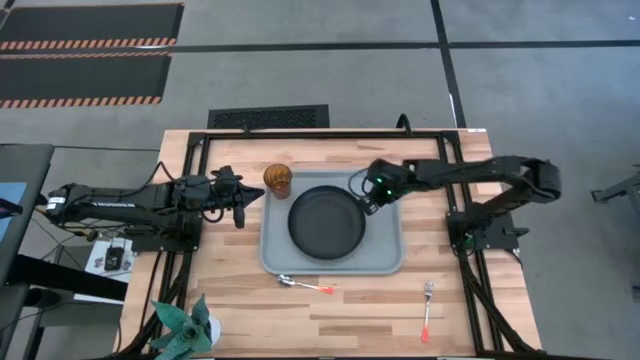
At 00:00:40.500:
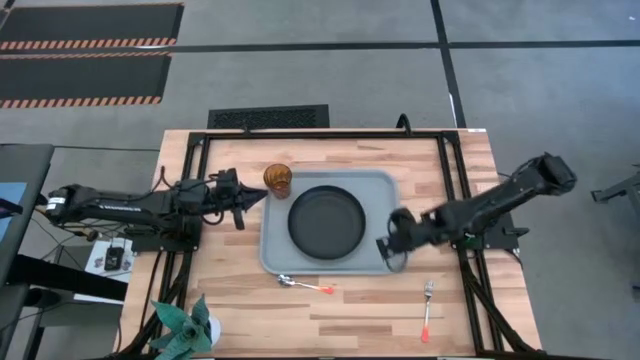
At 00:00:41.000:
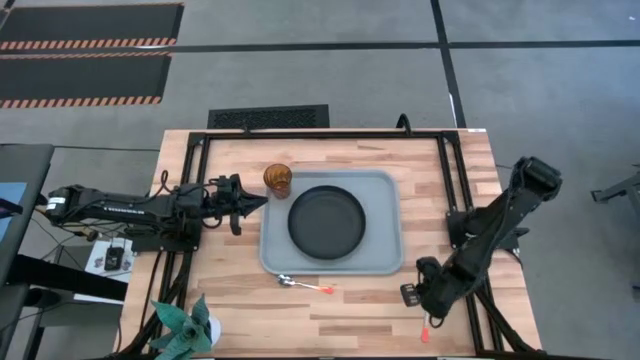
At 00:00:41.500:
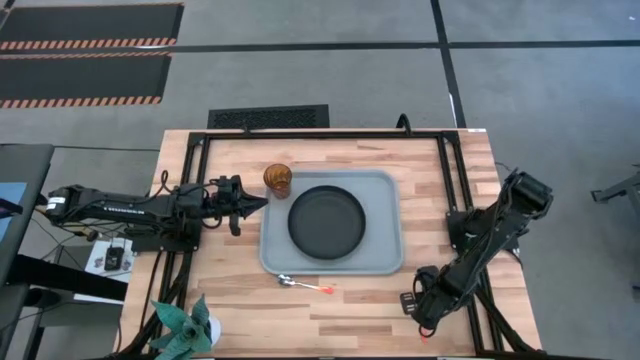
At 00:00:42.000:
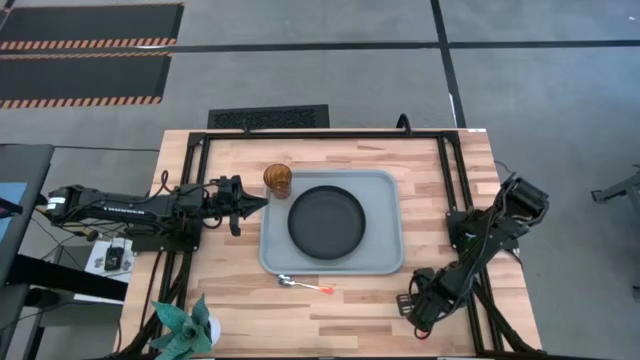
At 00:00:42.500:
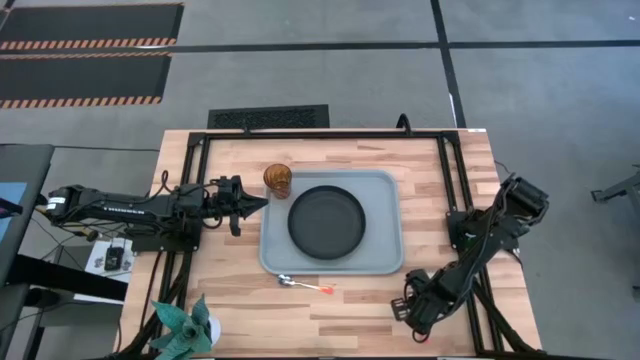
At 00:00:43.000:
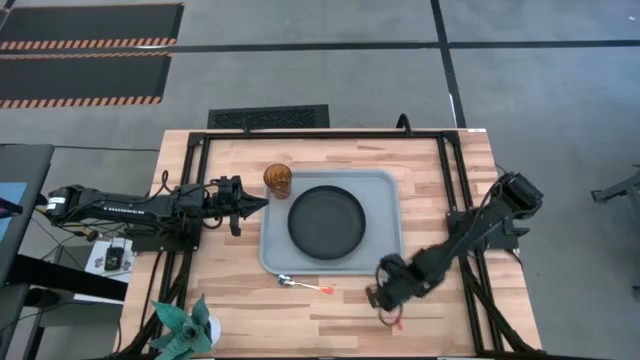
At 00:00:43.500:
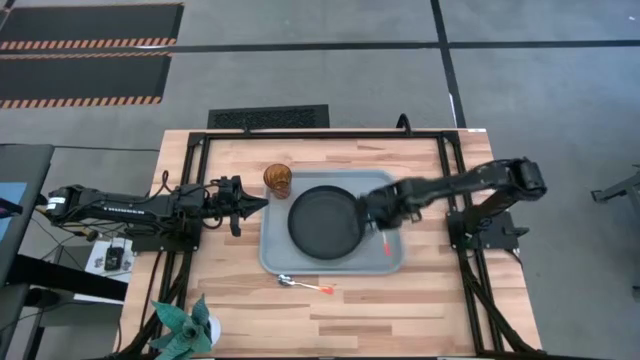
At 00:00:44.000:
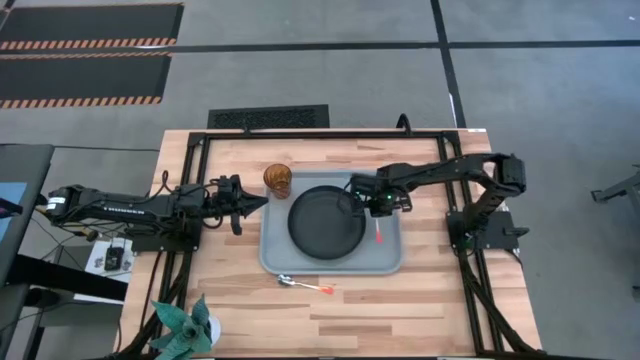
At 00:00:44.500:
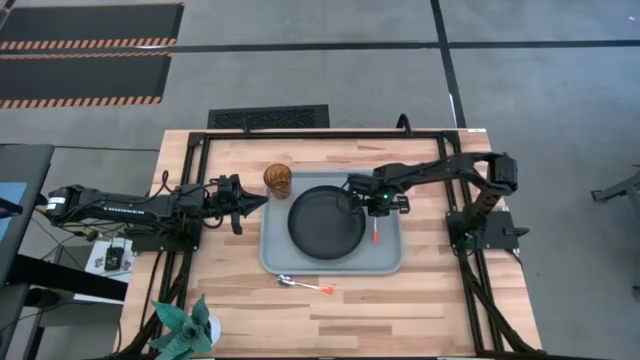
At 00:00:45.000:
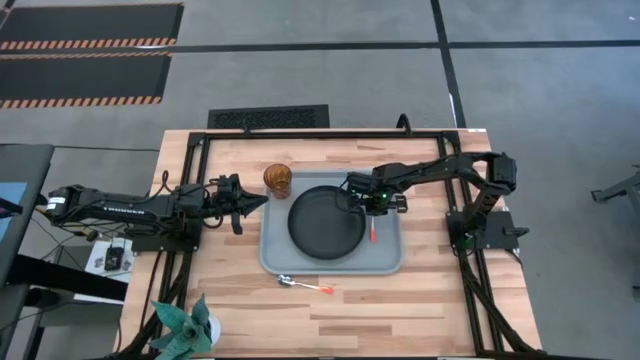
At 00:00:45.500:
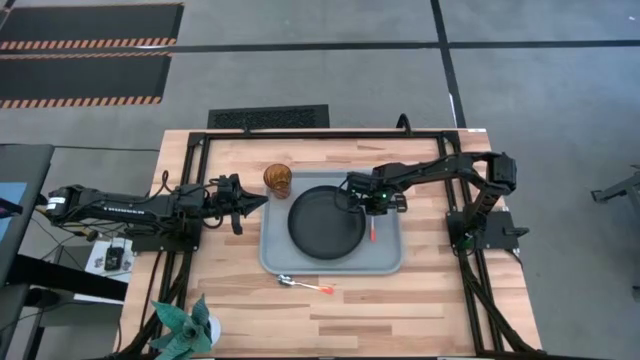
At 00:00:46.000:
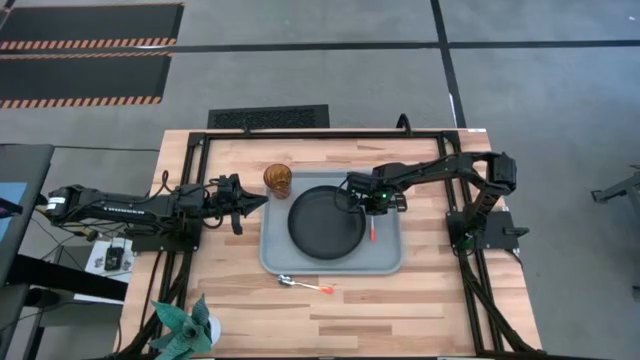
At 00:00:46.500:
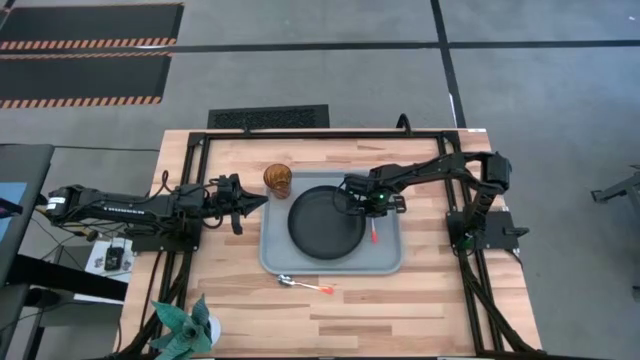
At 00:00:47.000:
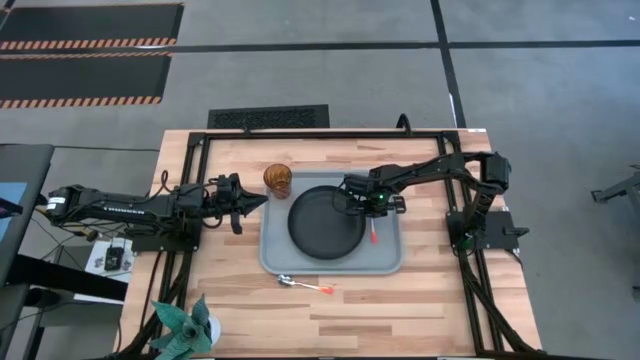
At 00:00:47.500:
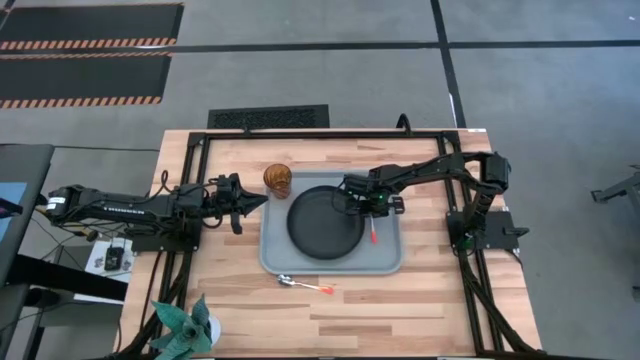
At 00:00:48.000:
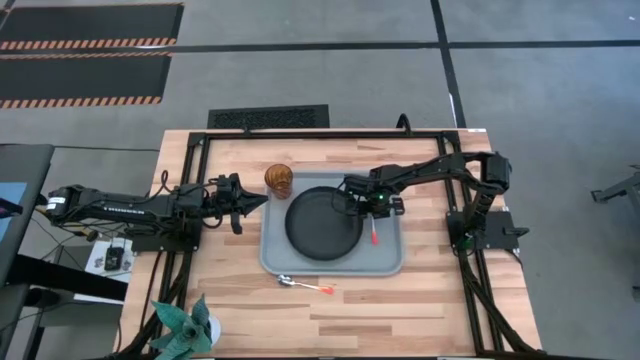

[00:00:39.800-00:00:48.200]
Task: Pick and place plate/cup/fork/spoon on tray
Put the orange fork on the gray tray to the right side of the black plate

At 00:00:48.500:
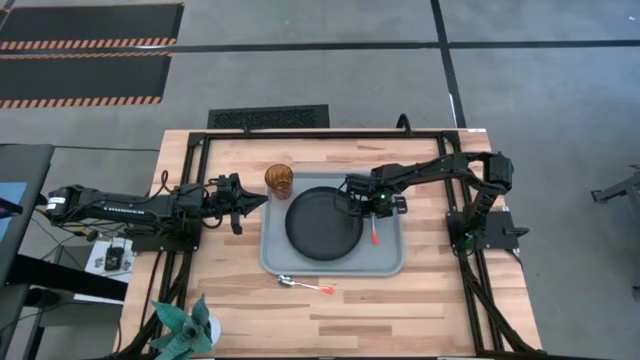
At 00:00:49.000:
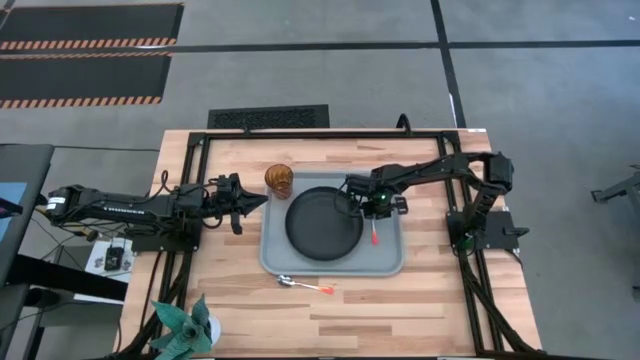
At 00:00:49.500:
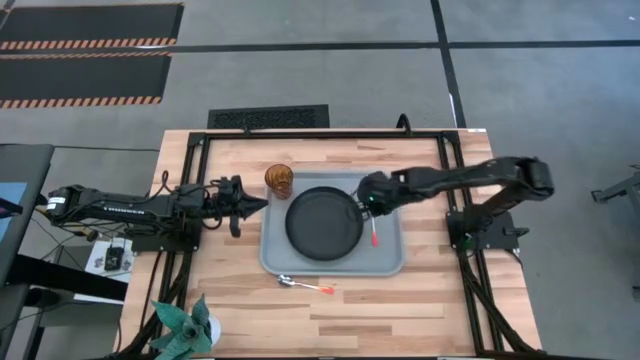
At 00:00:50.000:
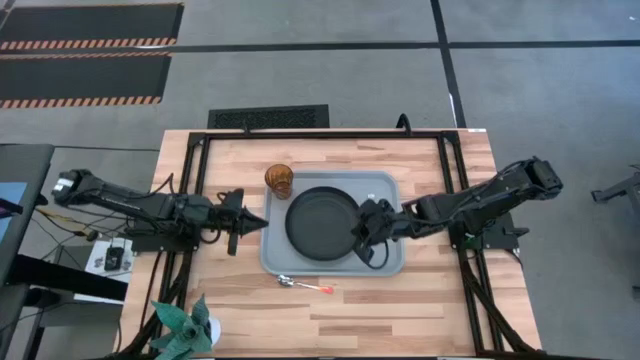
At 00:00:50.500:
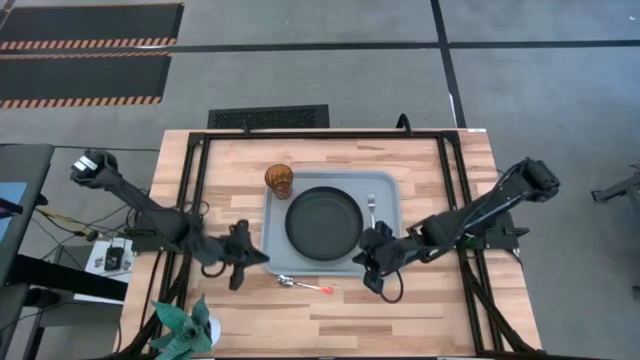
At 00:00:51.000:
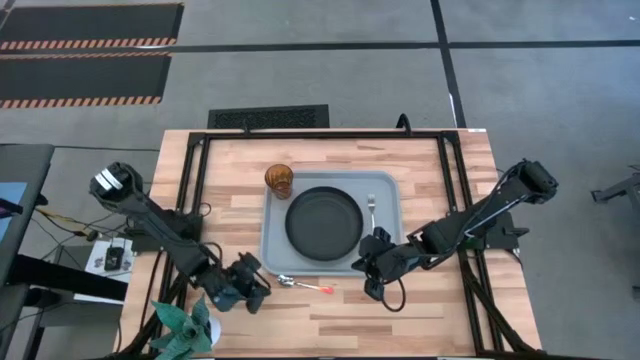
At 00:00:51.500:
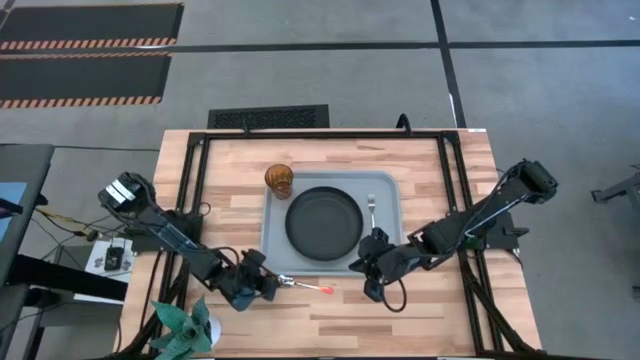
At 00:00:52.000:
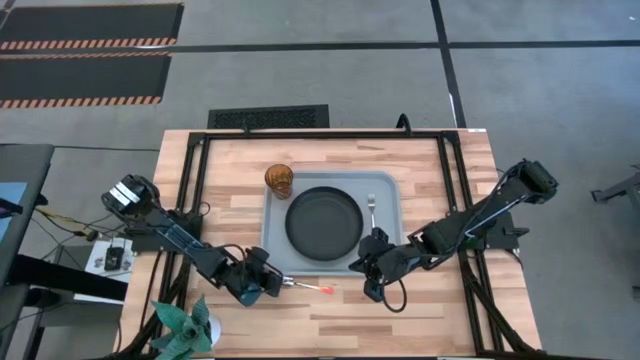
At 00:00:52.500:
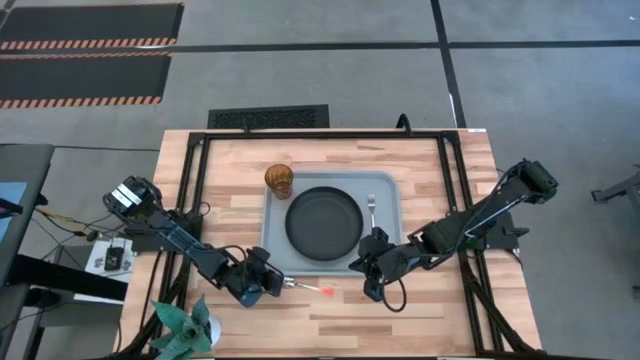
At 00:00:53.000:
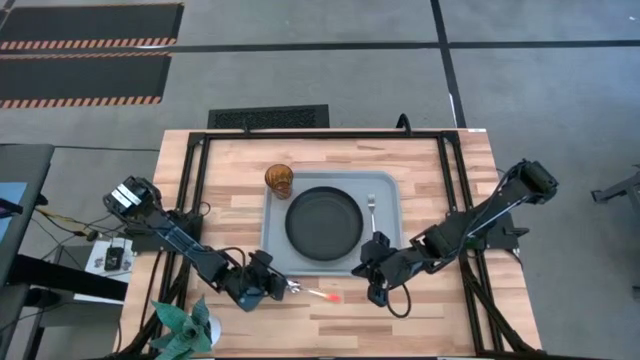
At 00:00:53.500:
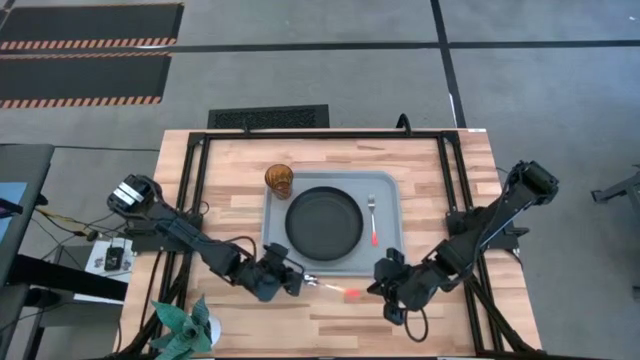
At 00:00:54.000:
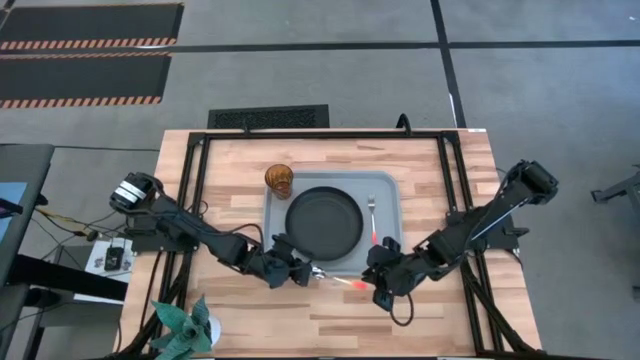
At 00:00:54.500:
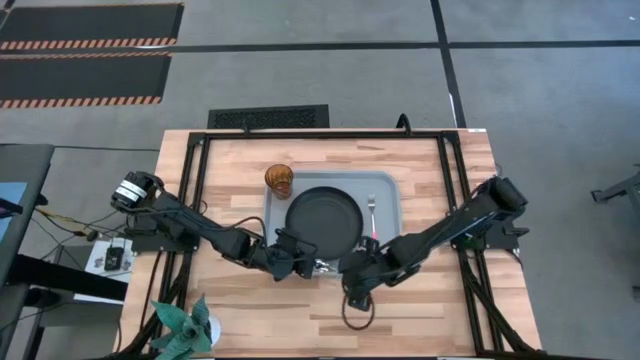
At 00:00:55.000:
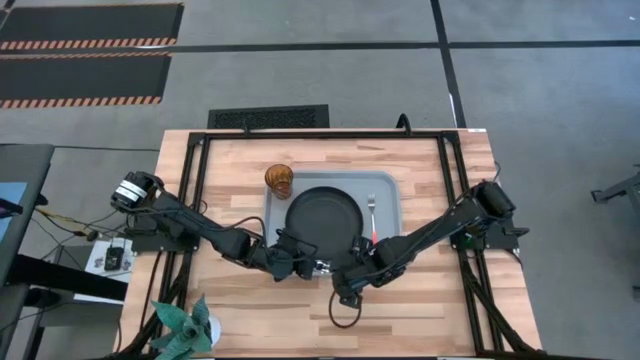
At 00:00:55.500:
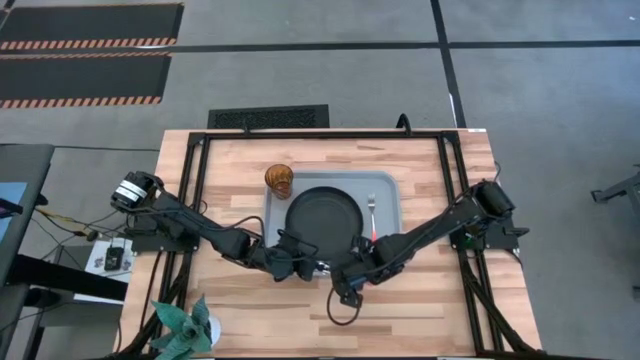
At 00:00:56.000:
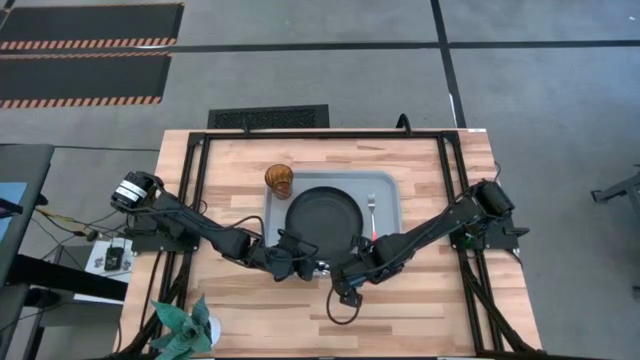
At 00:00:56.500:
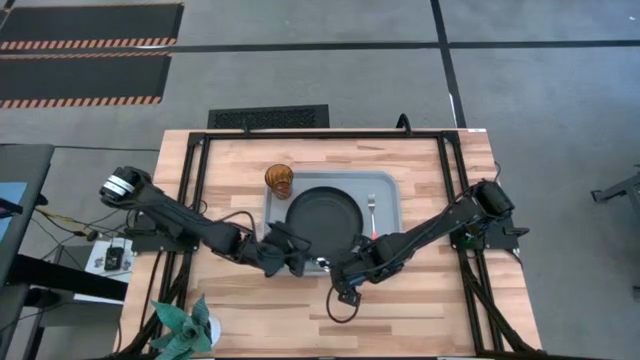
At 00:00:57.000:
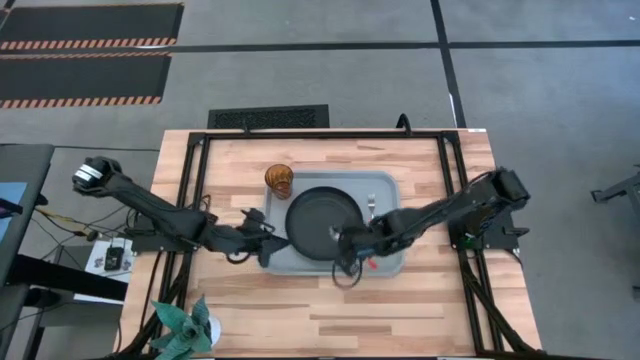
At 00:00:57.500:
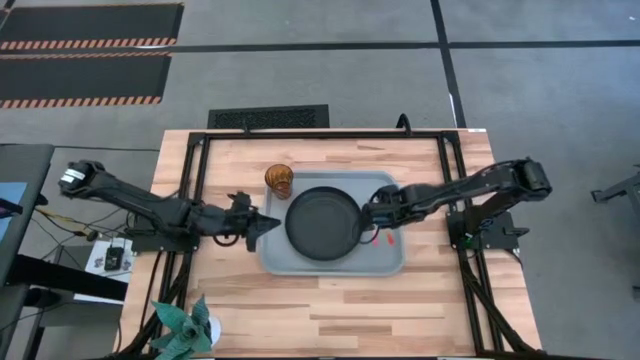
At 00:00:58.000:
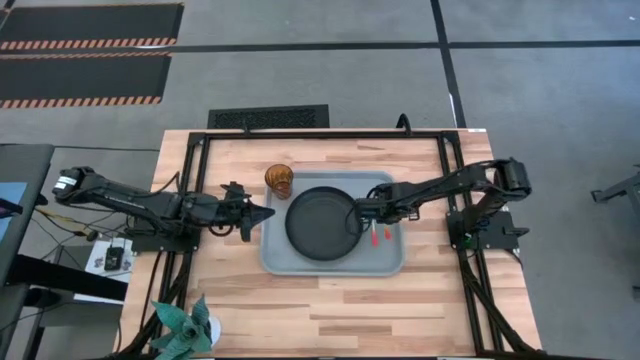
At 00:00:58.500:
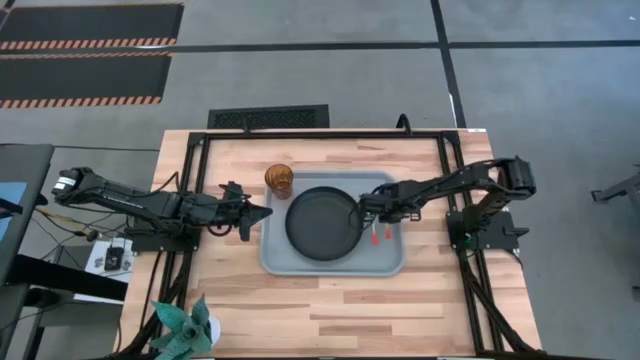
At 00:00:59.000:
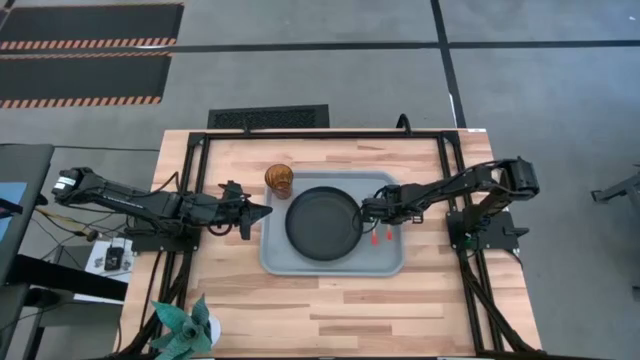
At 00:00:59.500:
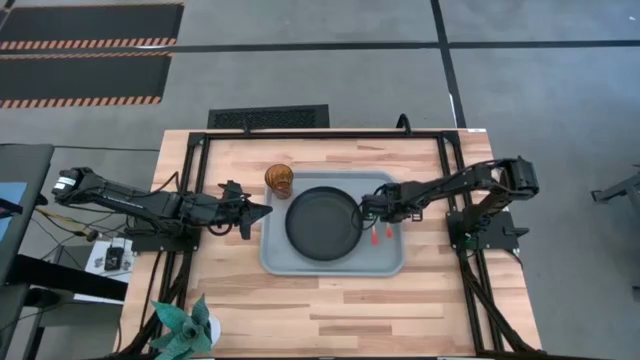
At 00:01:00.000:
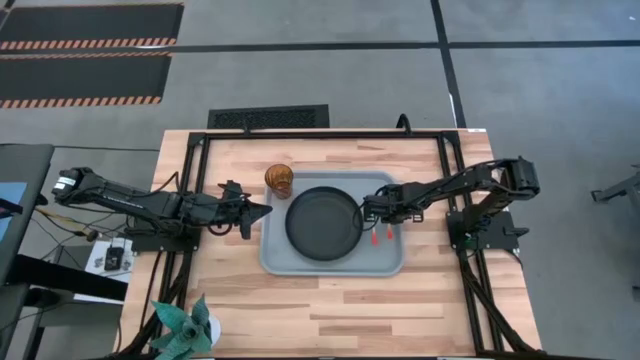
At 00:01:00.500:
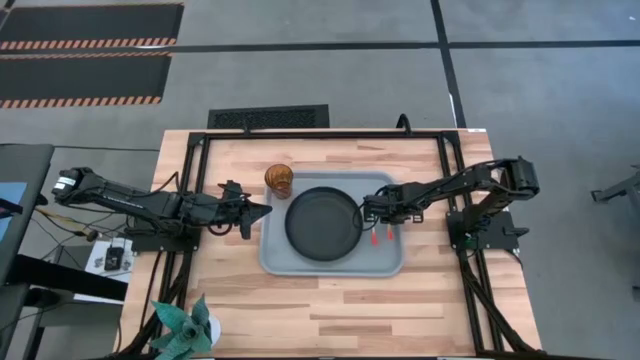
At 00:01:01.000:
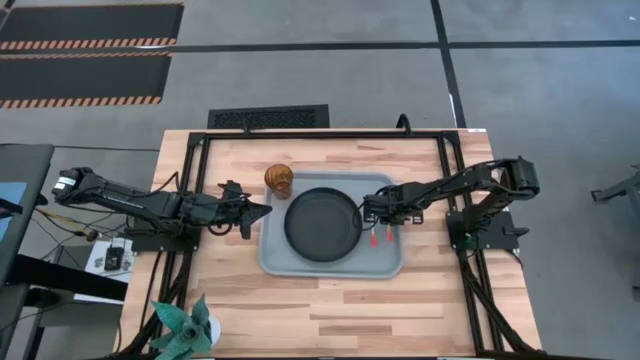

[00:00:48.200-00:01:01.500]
Put the orange spoon on the gray tray to the right side of the orange fork
